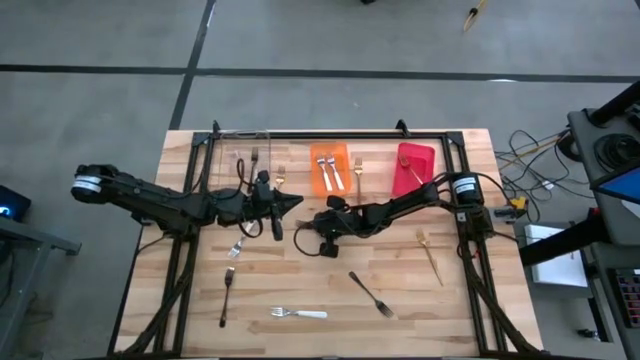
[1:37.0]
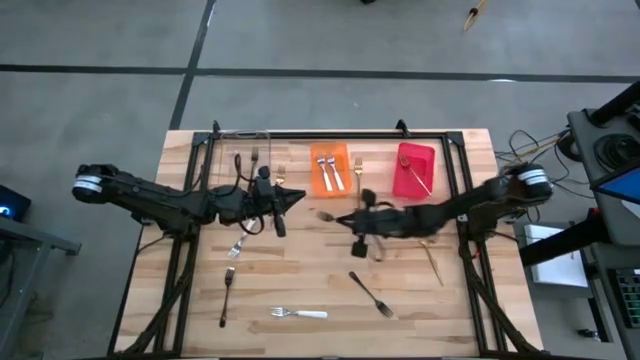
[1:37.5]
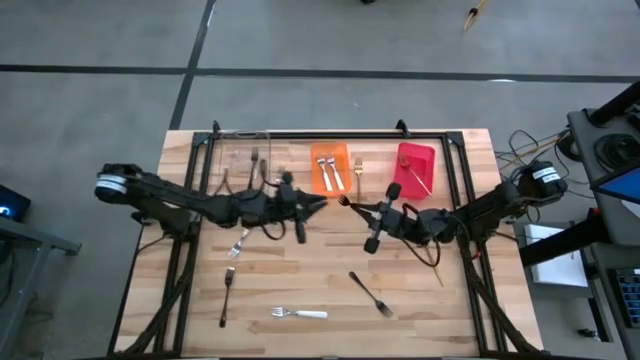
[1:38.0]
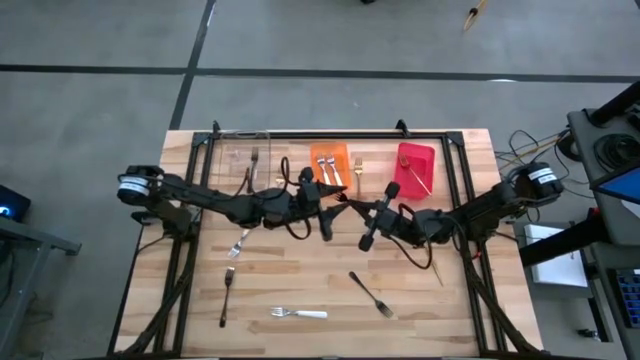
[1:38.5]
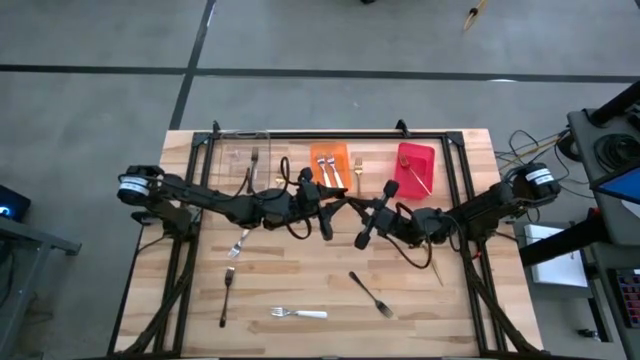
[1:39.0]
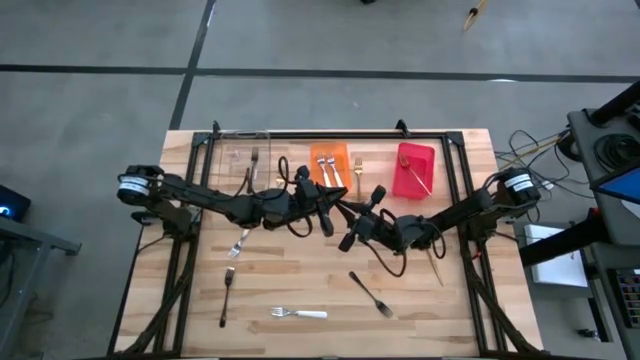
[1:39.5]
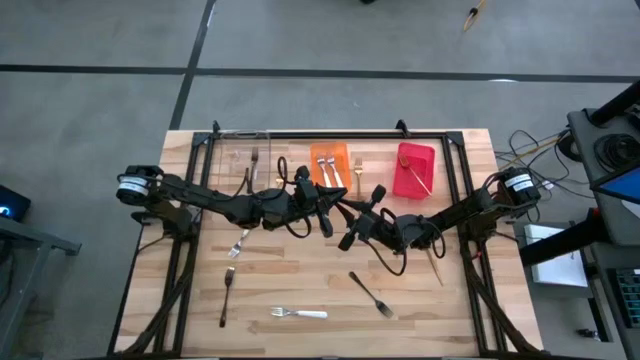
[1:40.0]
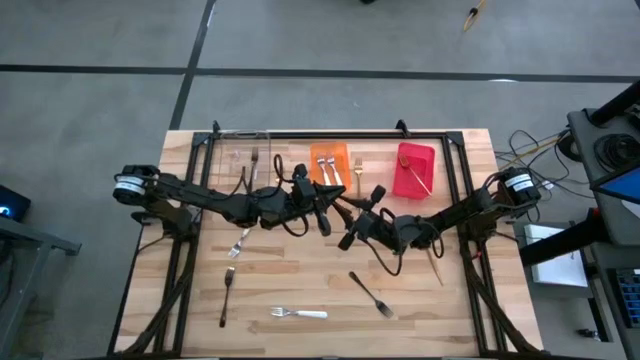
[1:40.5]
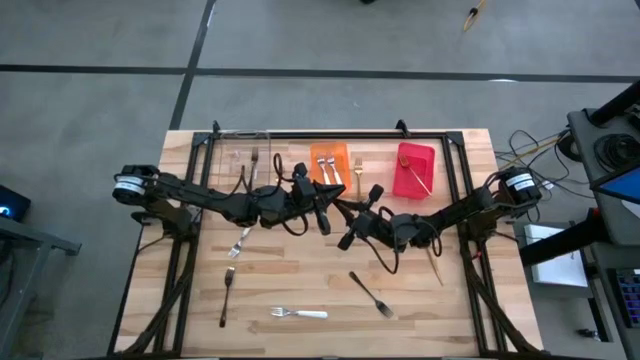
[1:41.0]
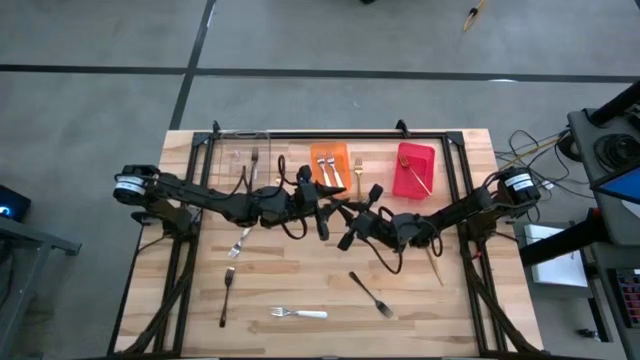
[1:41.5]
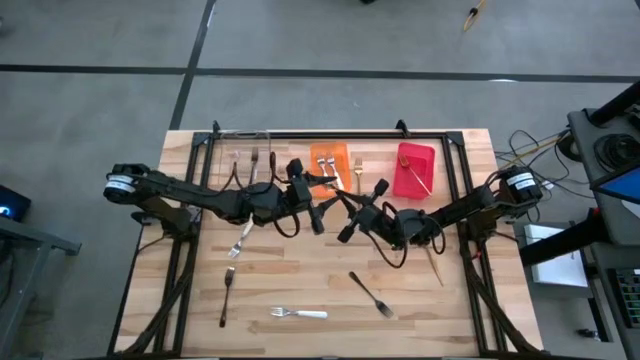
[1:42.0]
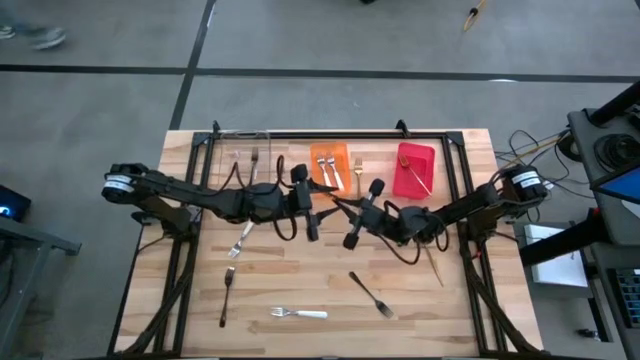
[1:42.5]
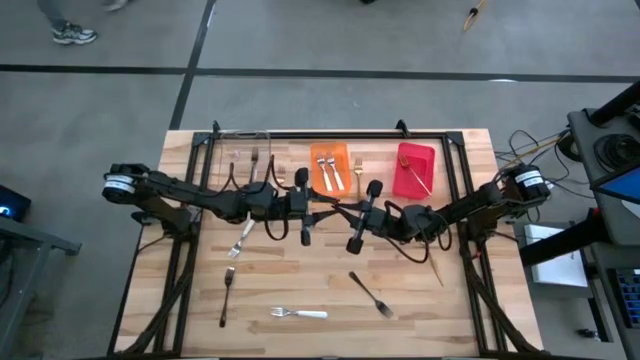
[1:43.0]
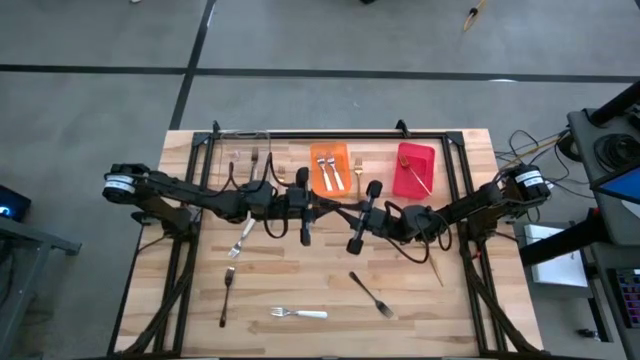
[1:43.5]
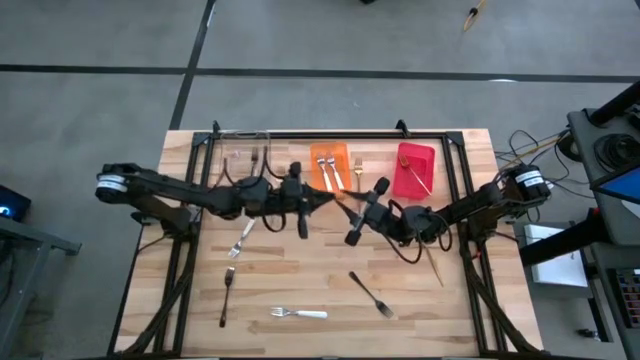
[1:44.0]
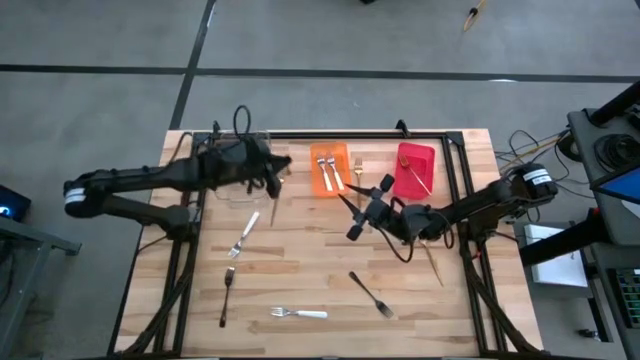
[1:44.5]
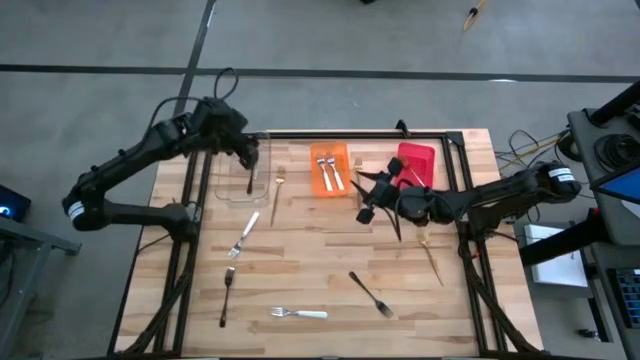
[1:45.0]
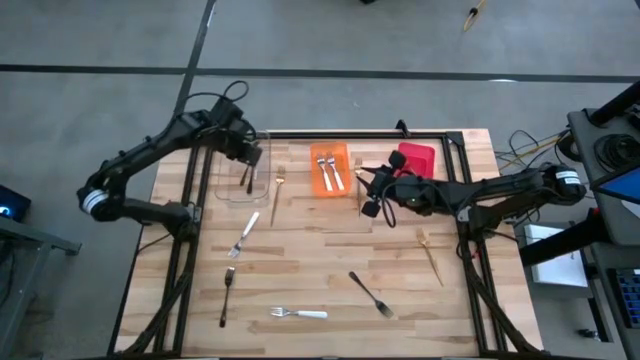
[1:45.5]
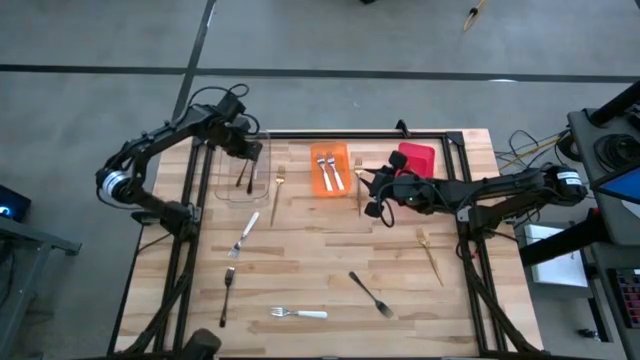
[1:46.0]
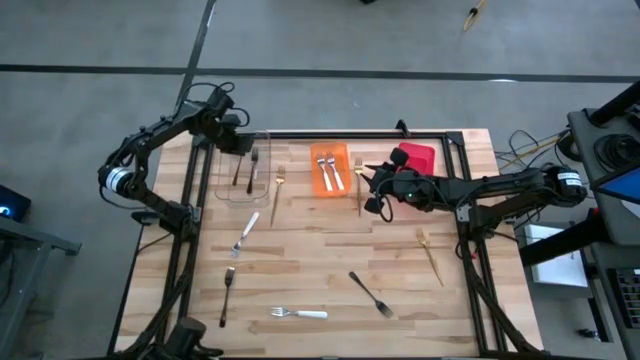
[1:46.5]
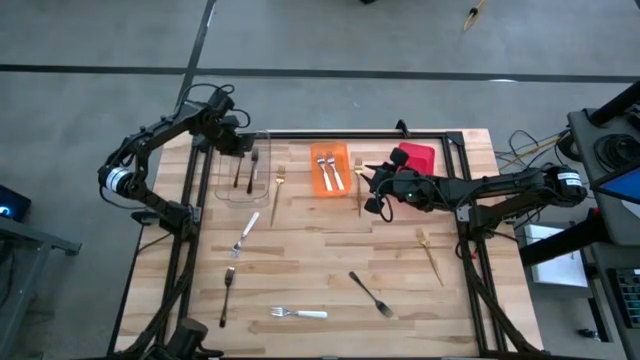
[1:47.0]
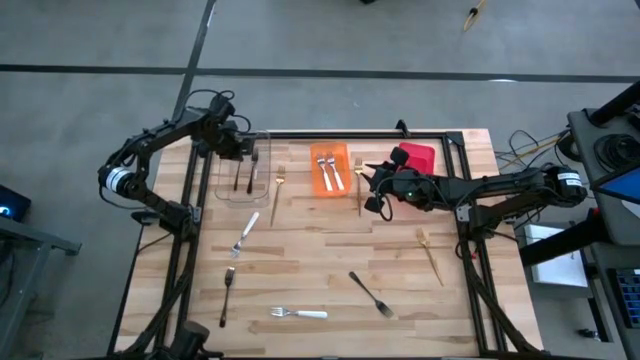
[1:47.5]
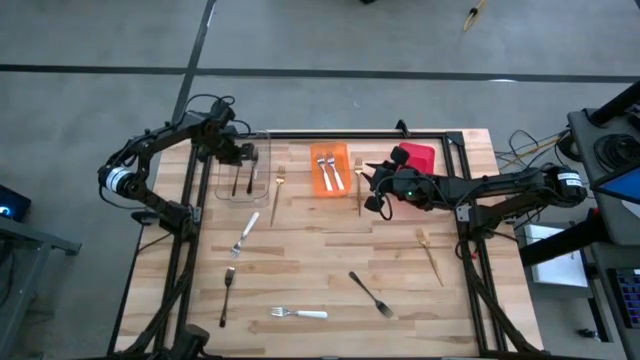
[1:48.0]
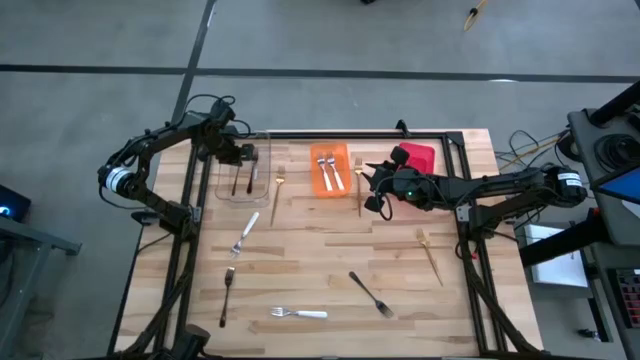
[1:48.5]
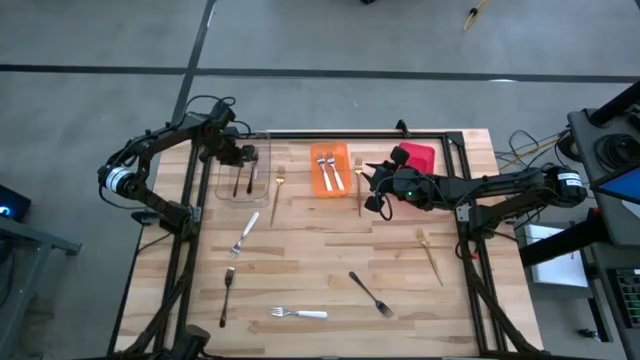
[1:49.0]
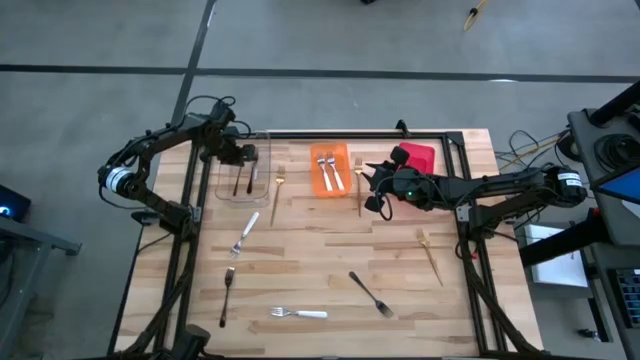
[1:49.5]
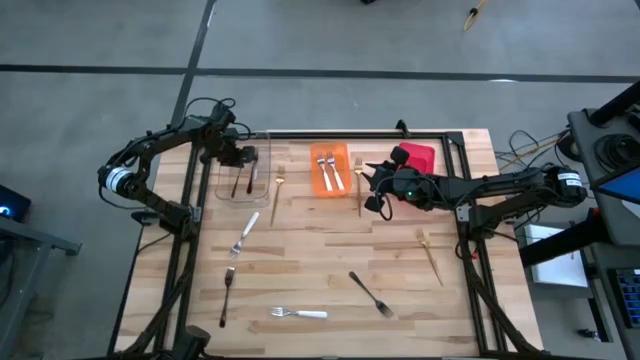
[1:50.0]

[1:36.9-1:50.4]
Task: Sort silverware by color (type)
Put the right black fork into the transparent bin

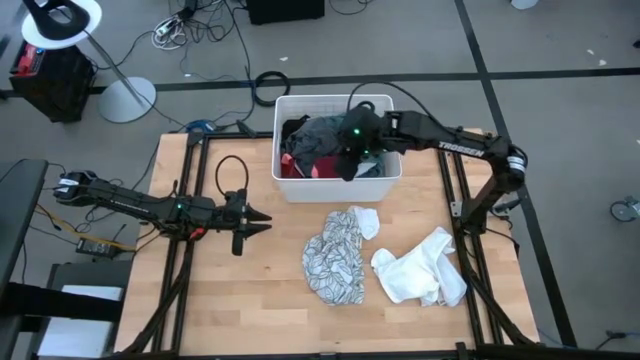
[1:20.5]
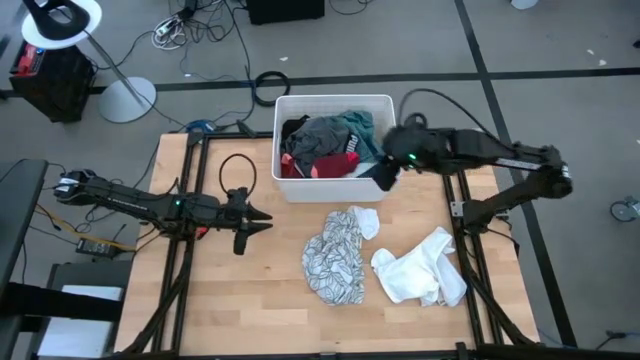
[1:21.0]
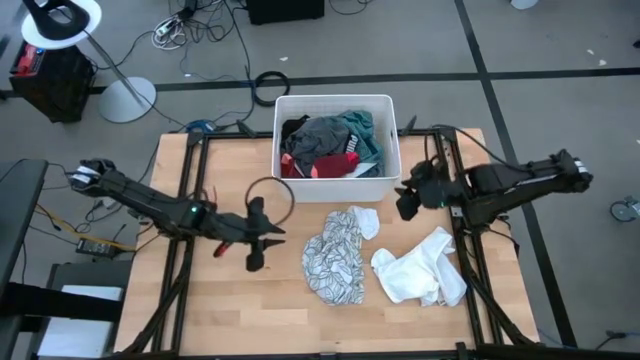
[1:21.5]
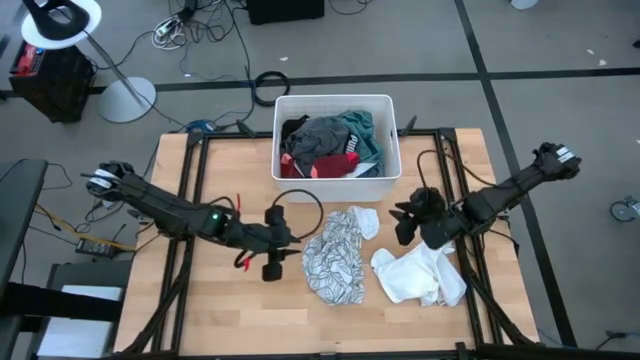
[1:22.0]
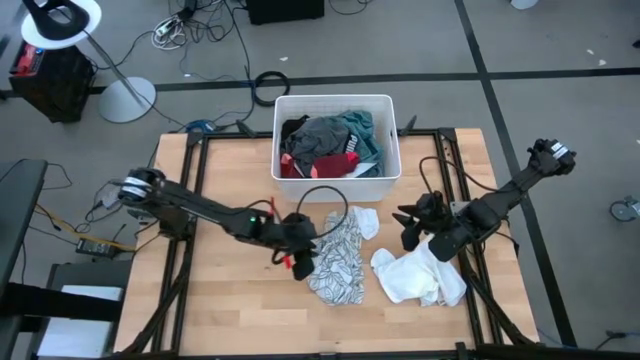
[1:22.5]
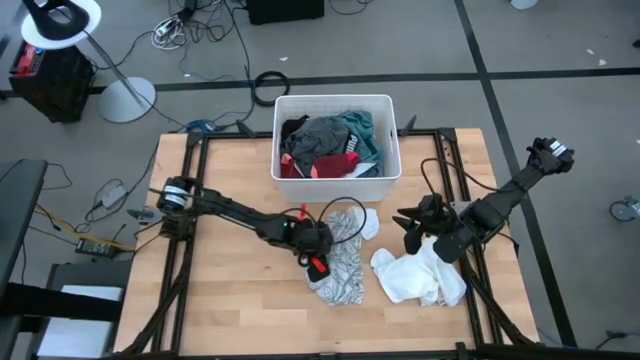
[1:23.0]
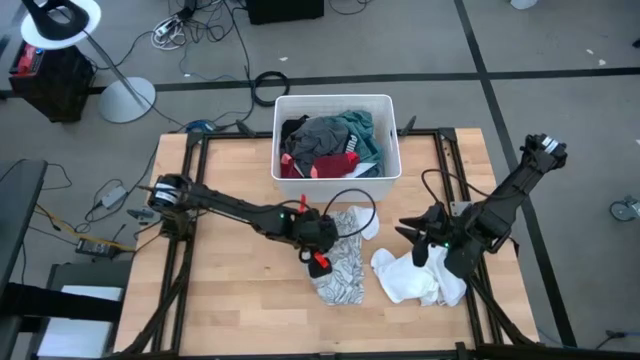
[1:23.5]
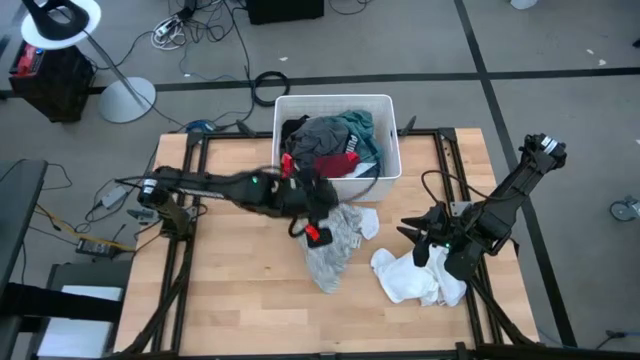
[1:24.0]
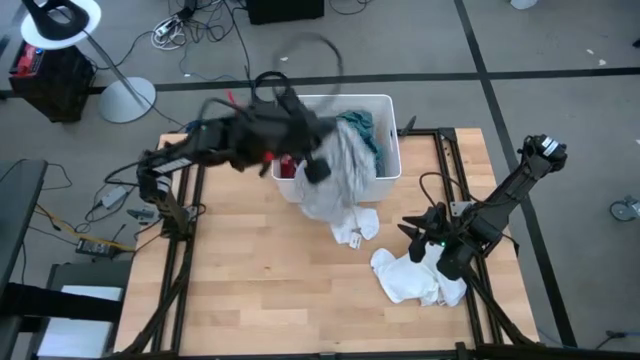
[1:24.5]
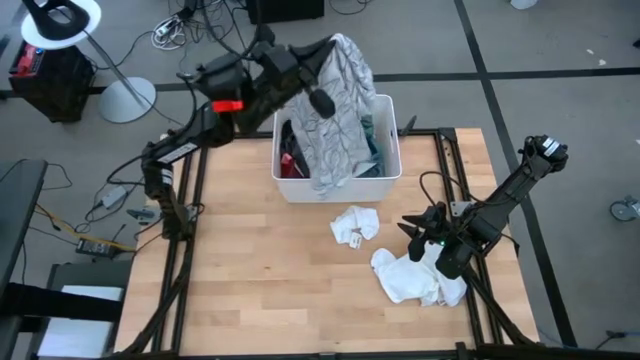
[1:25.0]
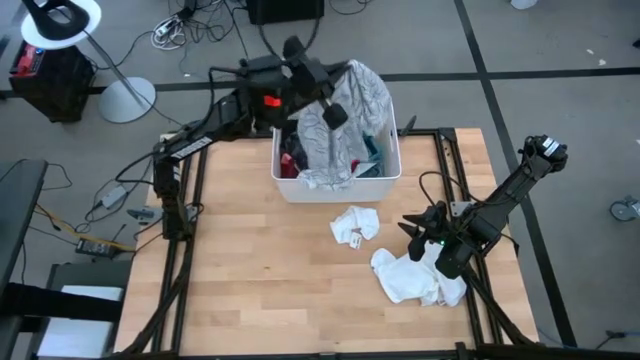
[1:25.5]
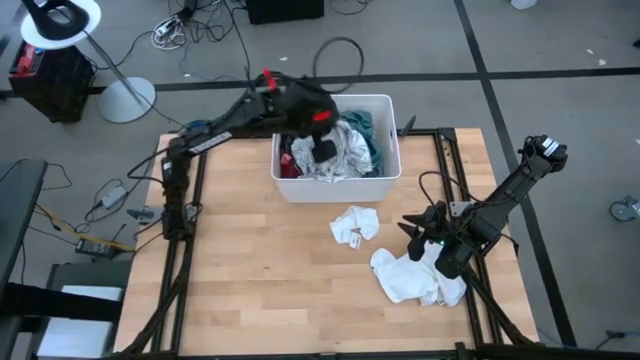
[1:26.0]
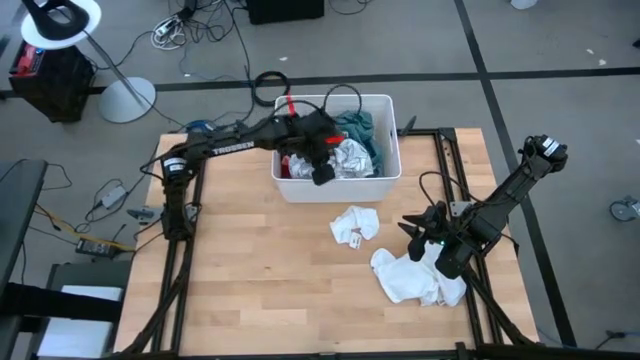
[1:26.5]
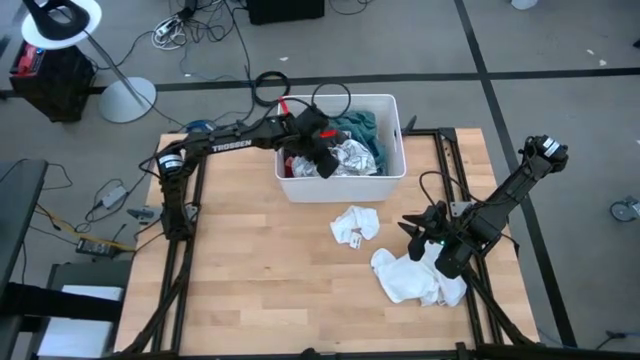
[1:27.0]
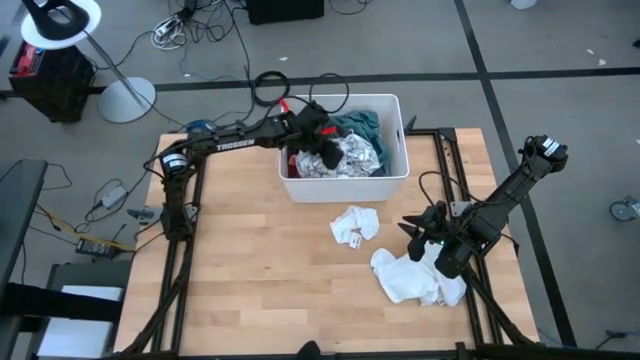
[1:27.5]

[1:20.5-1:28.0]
Task: Sort clothes
Put the floral shirt into the white laundry bin
